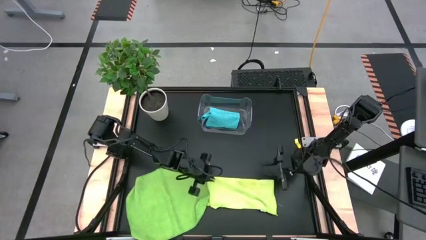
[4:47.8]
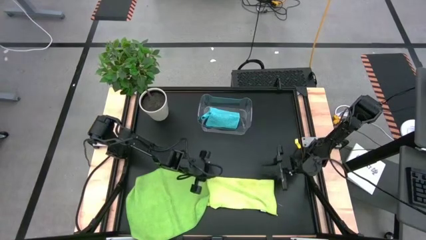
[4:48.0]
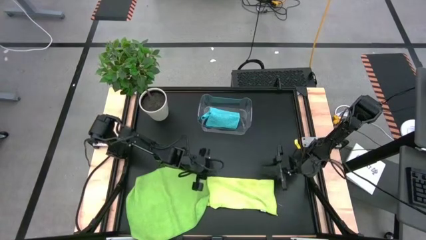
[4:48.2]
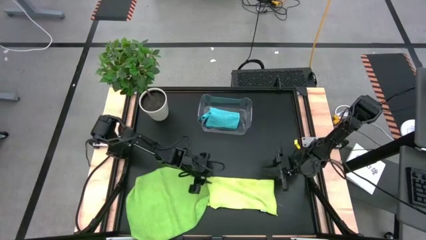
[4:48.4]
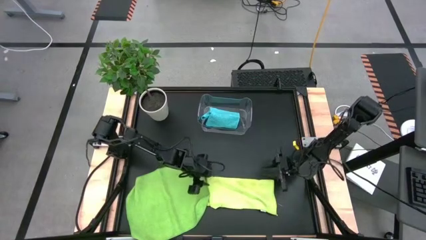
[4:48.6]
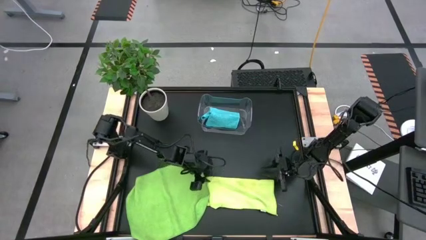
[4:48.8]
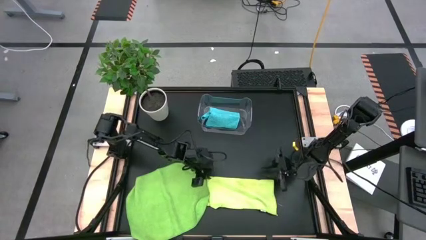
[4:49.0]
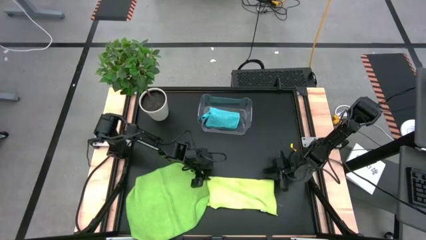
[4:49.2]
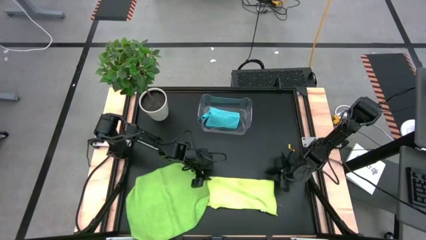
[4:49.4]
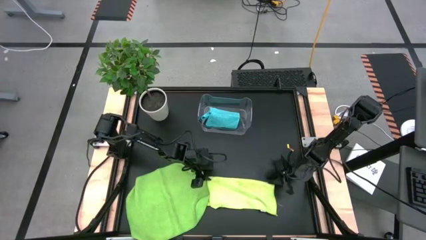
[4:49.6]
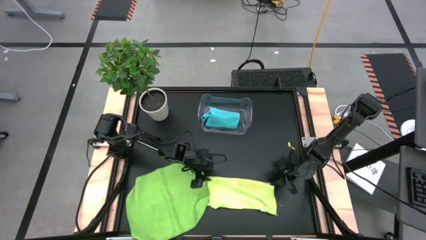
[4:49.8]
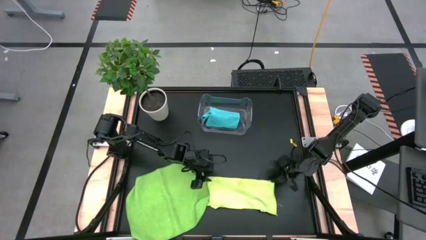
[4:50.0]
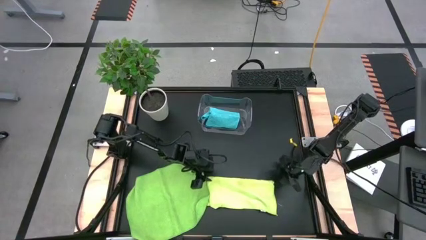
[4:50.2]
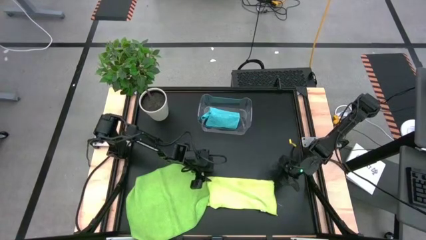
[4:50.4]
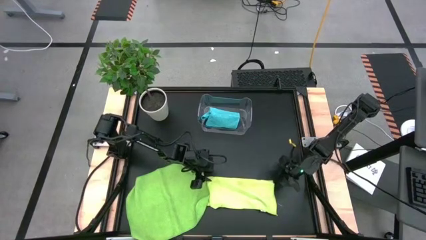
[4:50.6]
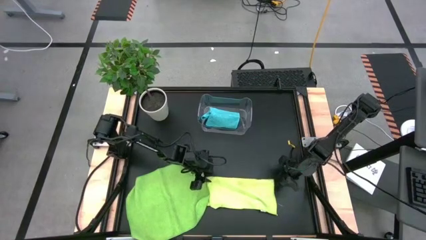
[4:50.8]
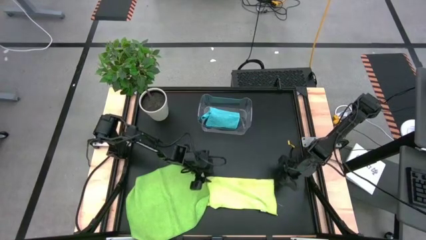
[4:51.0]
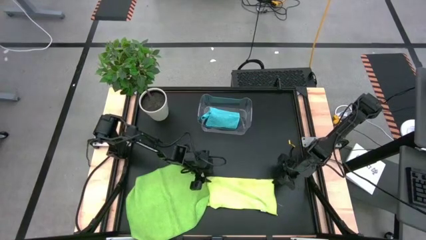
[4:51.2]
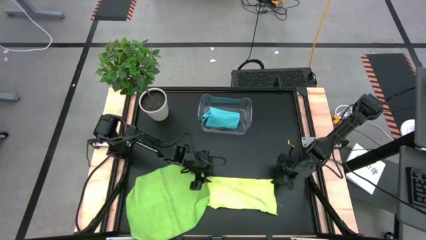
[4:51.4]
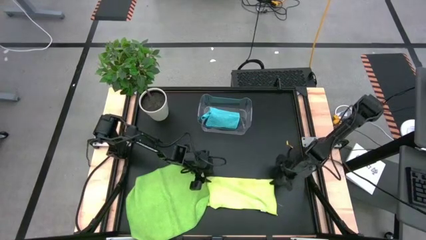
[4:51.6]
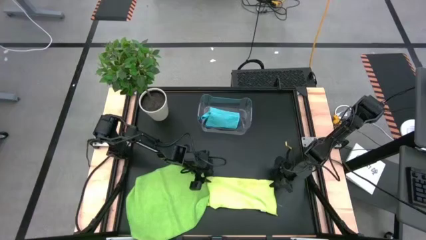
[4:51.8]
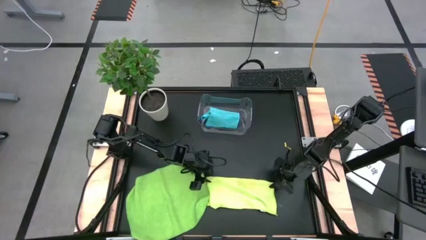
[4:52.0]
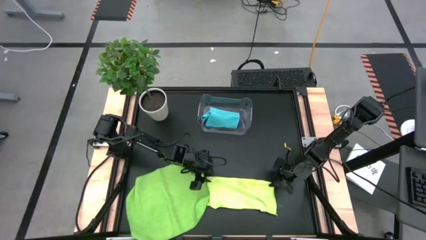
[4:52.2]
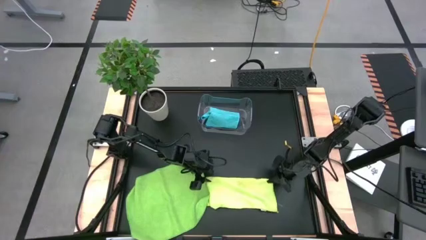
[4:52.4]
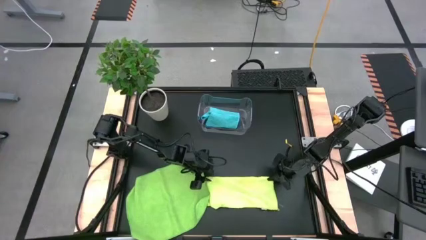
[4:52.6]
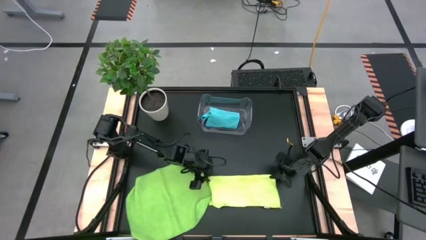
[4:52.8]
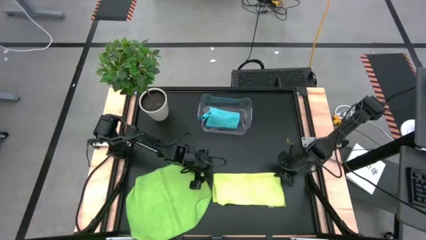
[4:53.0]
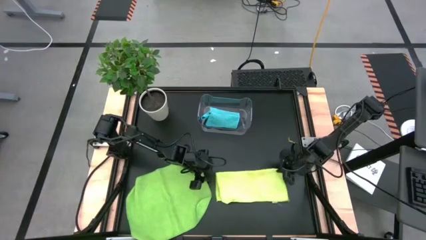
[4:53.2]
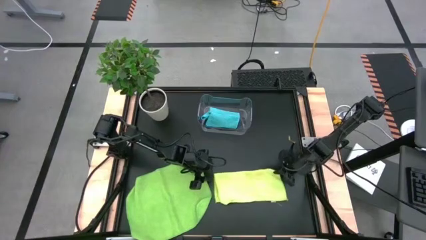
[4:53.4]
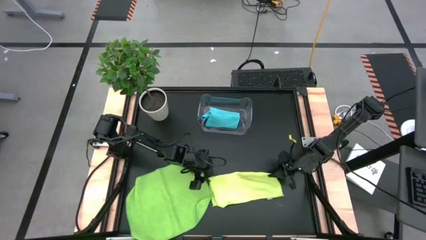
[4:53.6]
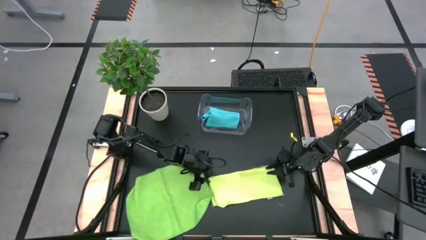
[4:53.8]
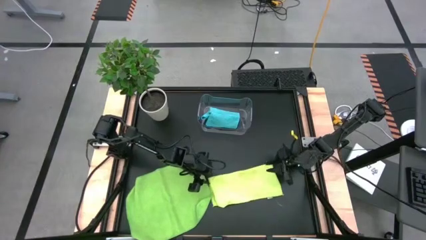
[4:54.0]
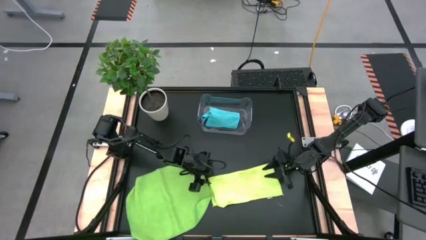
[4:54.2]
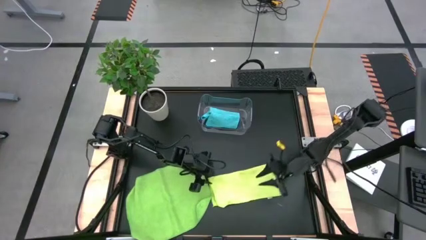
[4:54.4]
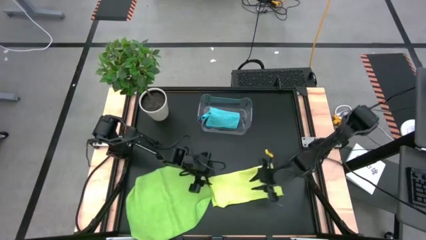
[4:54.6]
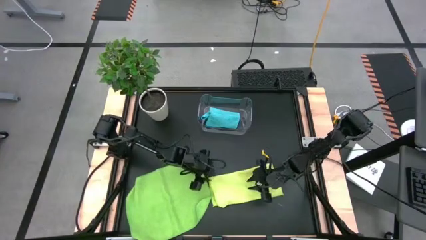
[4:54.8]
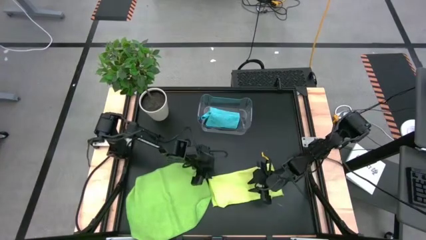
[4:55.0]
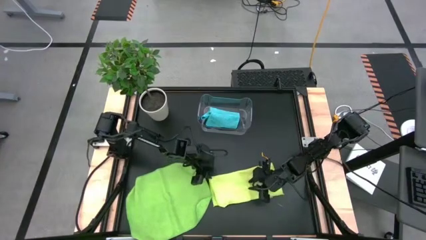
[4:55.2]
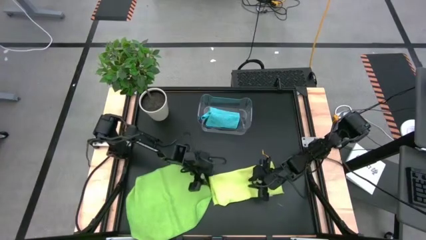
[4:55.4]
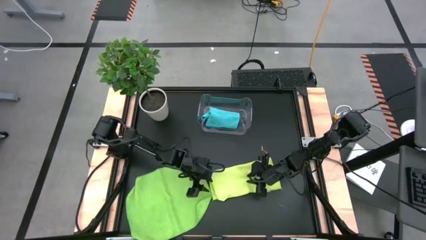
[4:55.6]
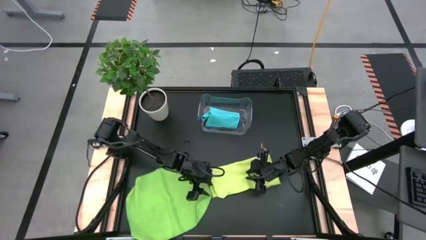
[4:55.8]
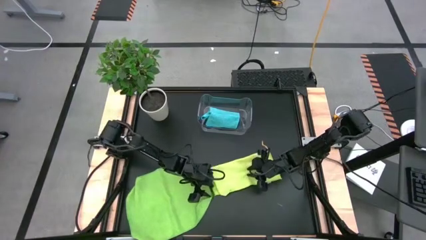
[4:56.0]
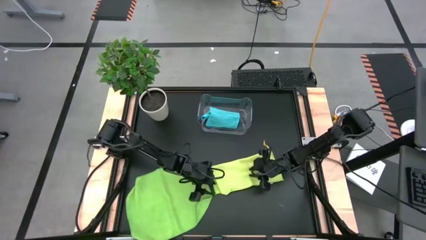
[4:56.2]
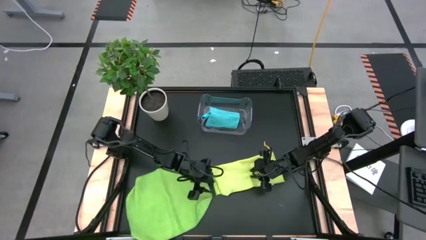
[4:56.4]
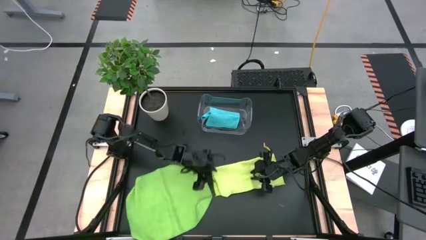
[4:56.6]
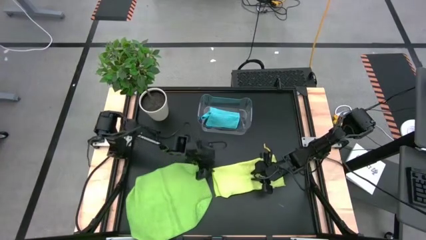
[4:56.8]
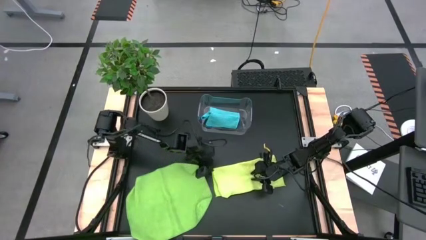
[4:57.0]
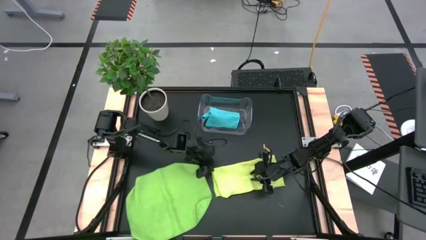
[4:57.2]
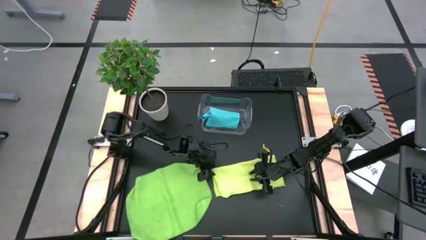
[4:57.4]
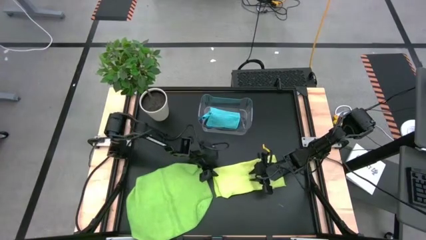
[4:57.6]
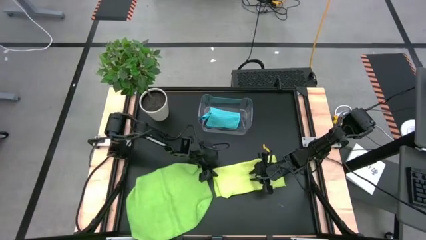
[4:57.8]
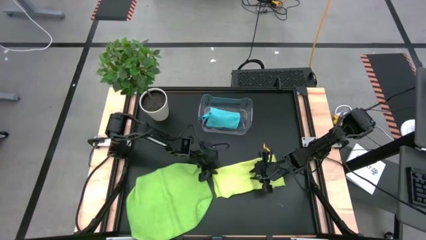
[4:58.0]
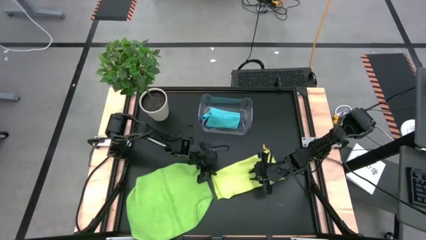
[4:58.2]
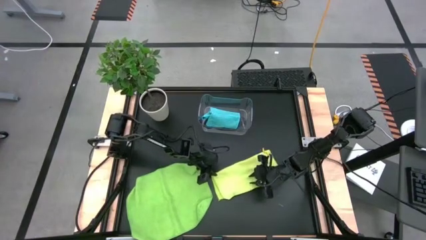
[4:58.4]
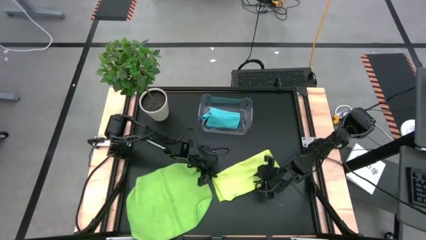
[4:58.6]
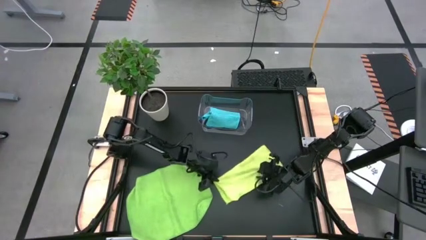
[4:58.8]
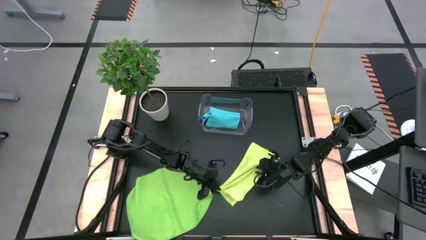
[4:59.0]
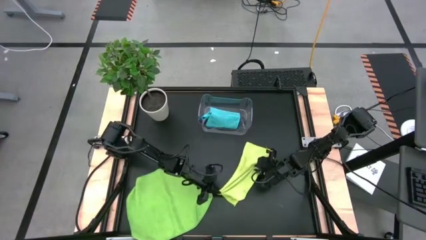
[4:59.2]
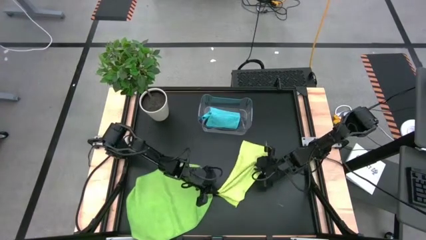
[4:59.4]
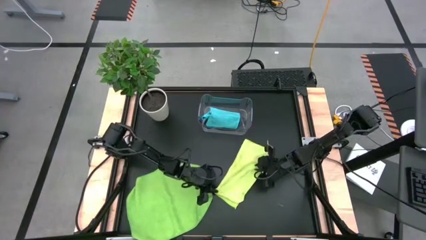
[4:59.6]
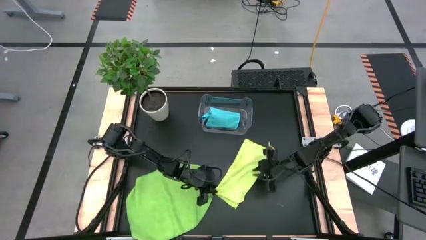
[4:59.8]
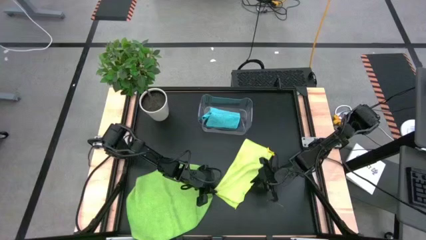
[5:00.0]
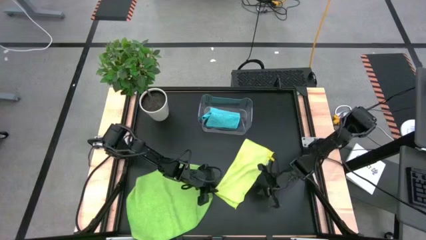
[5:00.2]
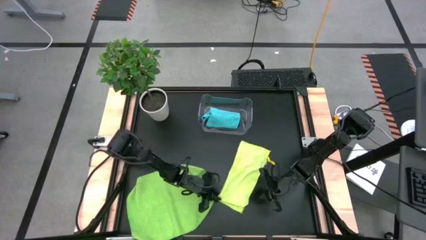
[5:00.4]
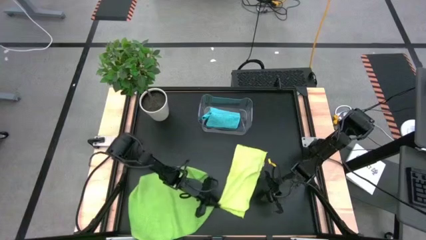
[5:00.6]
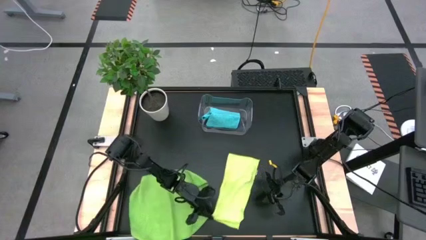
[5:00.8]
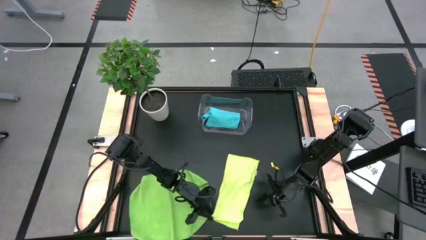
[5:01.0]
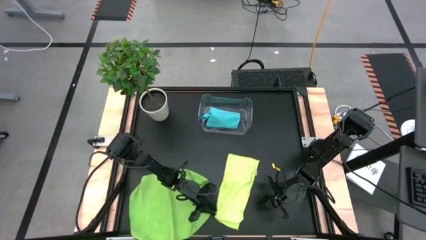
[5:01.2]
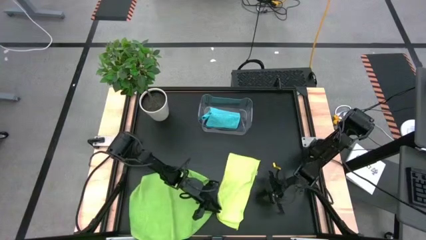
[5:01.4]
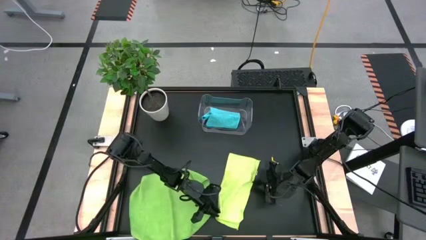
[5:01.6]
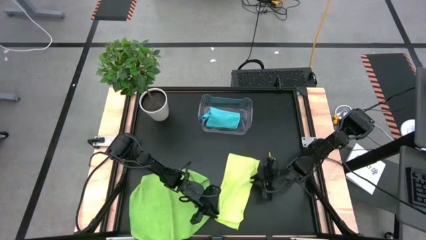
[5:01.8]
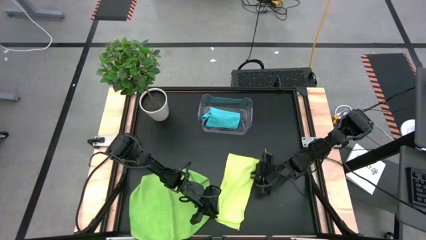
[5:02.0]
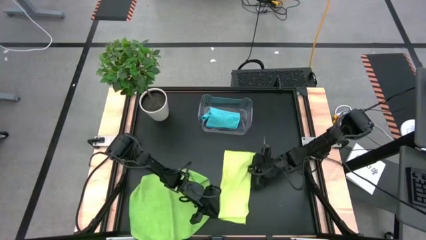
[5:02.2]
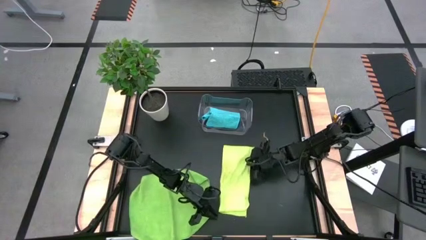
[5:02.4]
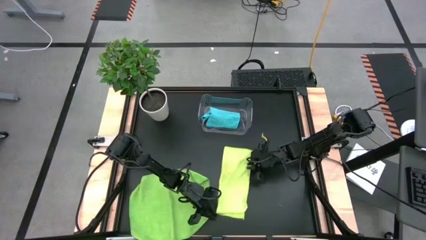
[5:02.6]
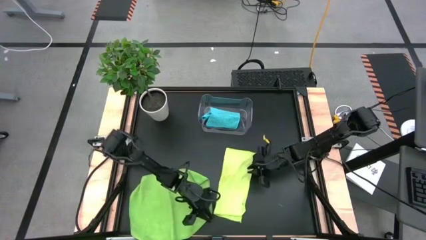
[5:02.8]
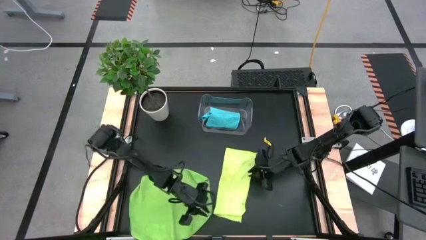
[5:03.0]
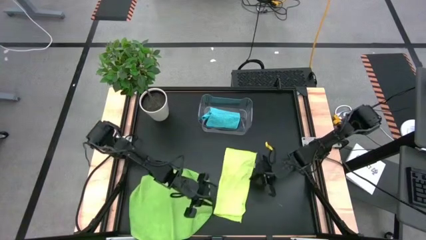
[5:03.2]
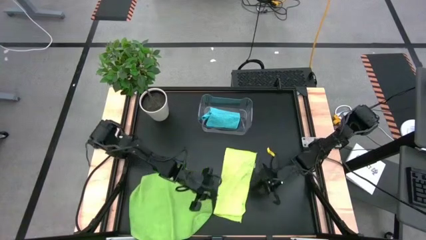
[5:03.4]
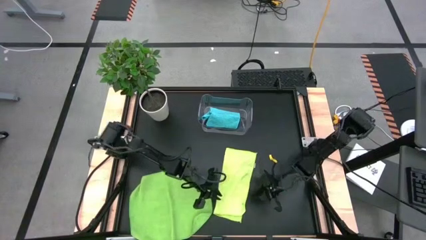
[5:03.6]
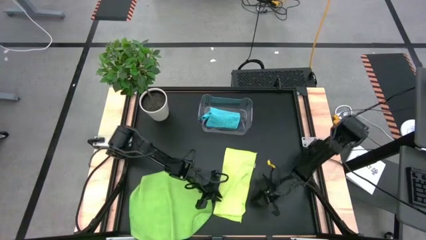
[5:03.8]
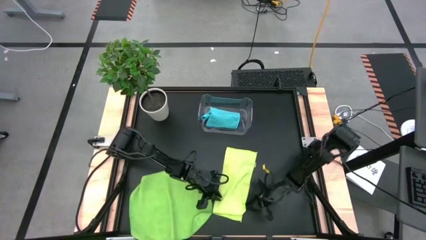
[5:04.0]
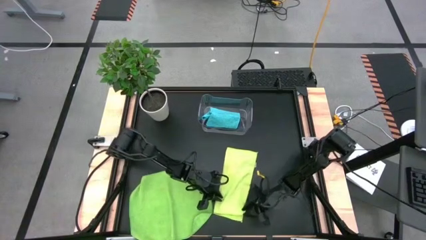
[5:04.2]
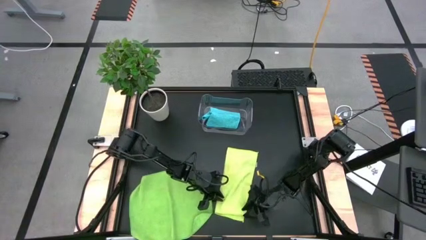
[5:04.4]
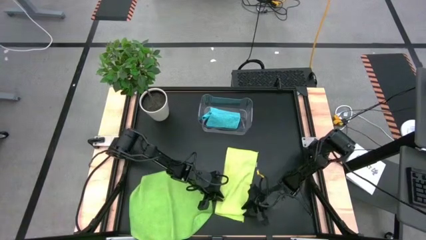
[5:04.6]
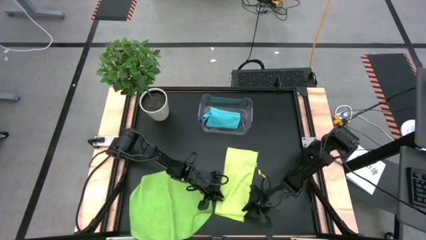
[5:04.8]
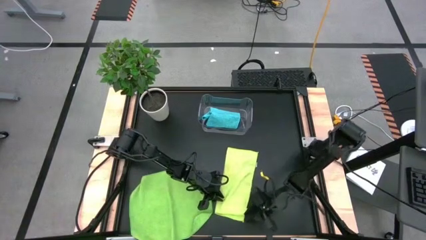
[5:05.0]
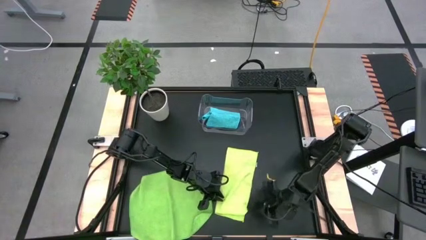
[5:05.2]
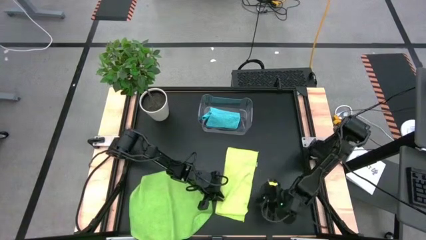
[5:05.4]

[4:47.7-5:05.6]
Task: Fold microfiber towels
Fold the light green towel
